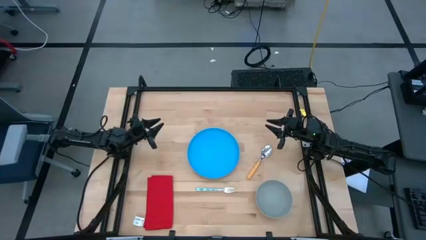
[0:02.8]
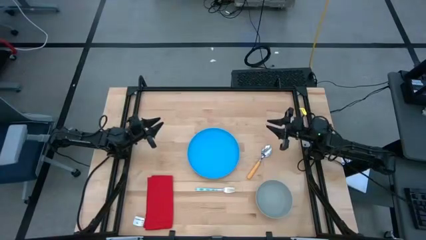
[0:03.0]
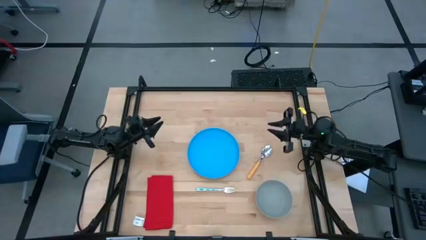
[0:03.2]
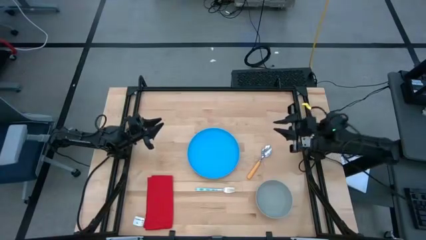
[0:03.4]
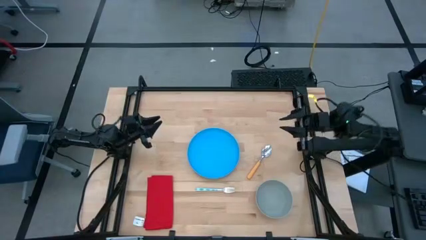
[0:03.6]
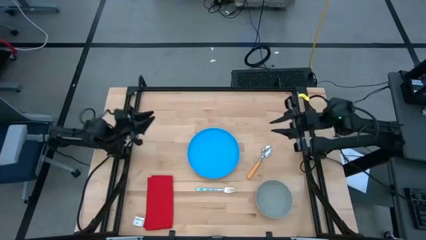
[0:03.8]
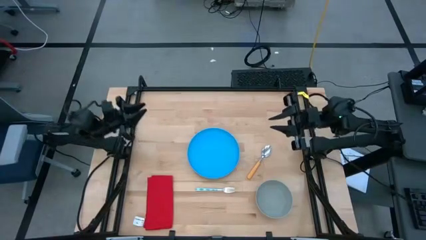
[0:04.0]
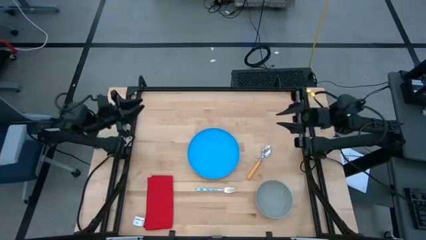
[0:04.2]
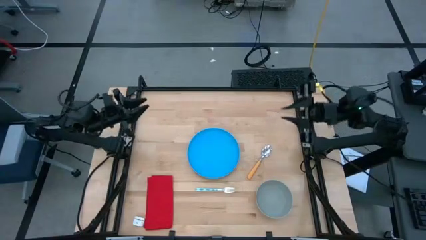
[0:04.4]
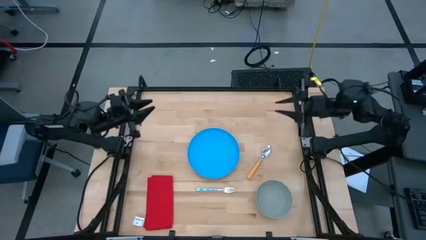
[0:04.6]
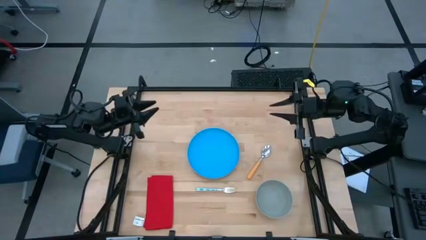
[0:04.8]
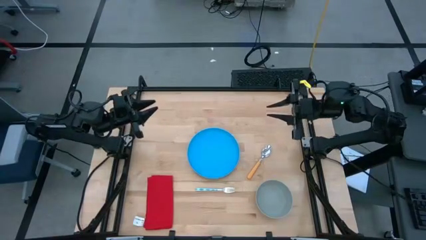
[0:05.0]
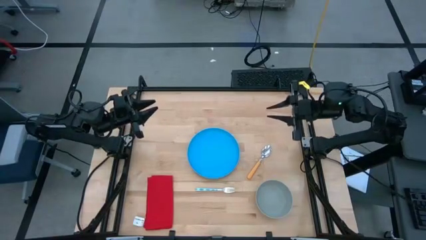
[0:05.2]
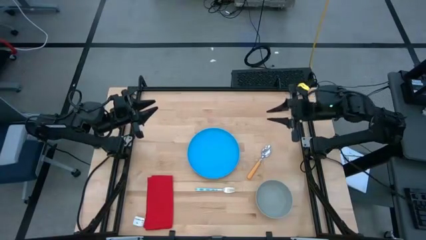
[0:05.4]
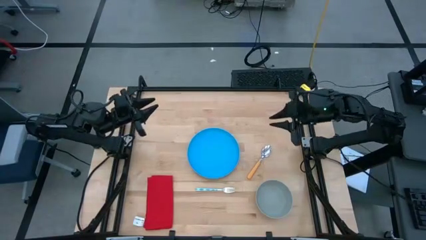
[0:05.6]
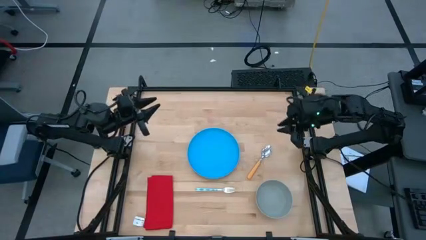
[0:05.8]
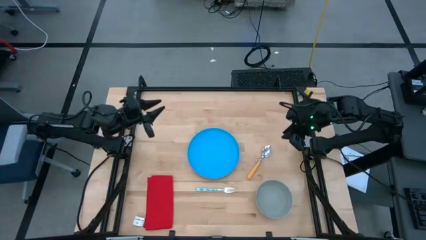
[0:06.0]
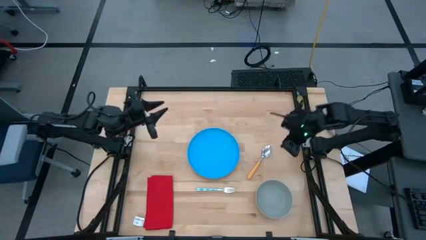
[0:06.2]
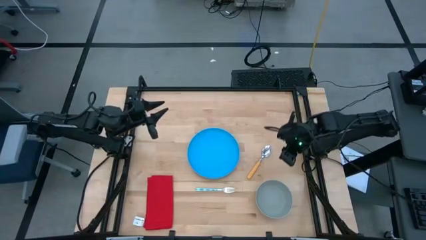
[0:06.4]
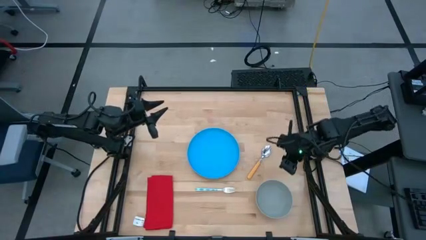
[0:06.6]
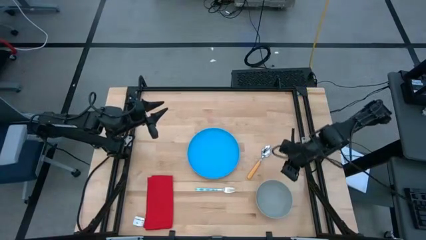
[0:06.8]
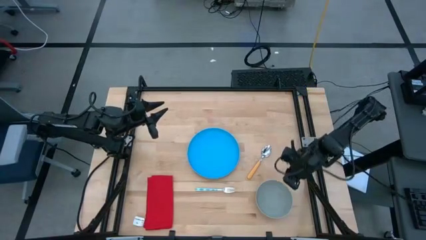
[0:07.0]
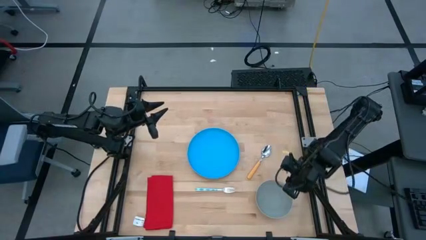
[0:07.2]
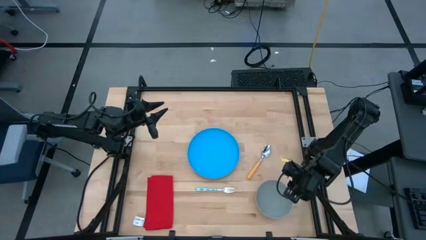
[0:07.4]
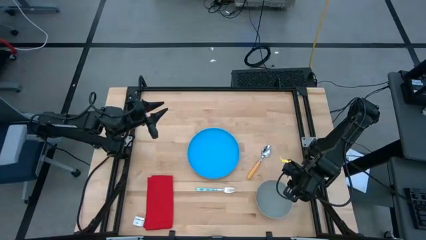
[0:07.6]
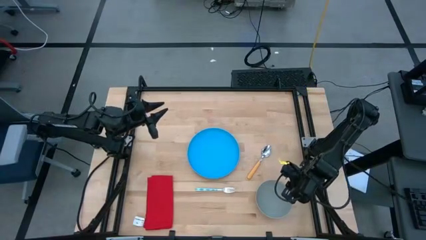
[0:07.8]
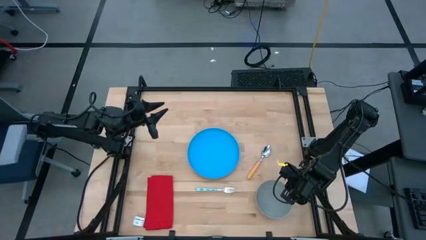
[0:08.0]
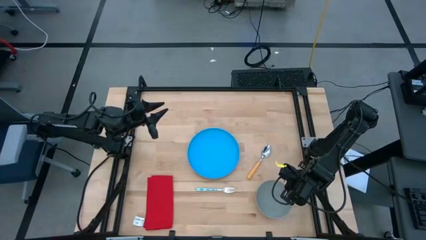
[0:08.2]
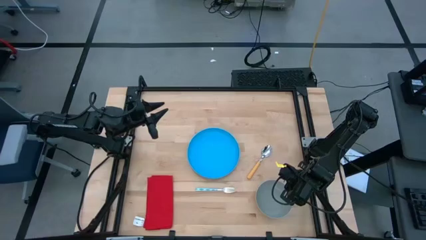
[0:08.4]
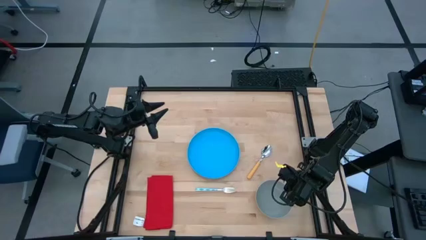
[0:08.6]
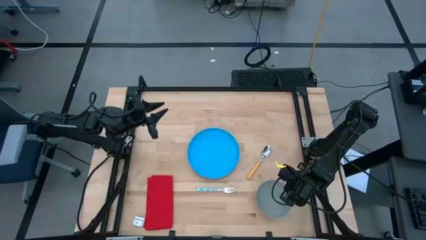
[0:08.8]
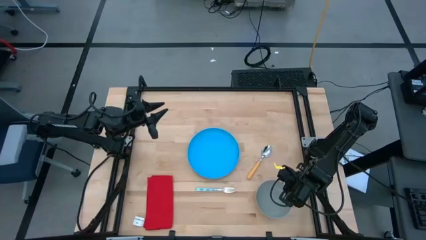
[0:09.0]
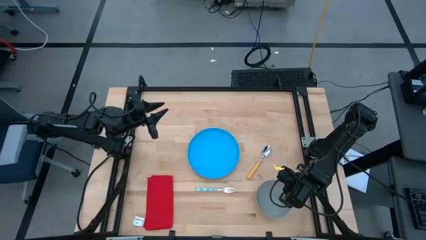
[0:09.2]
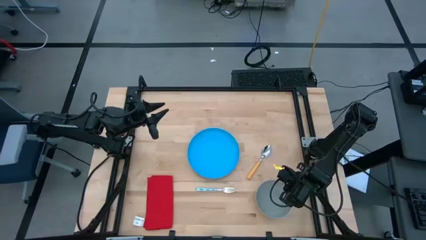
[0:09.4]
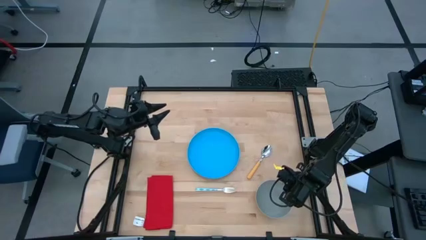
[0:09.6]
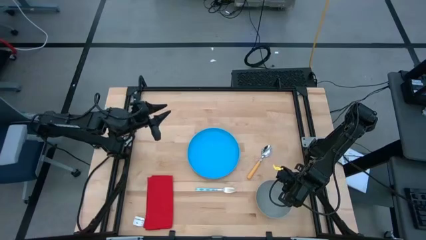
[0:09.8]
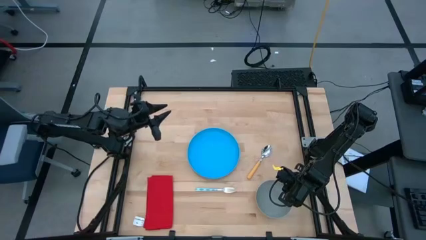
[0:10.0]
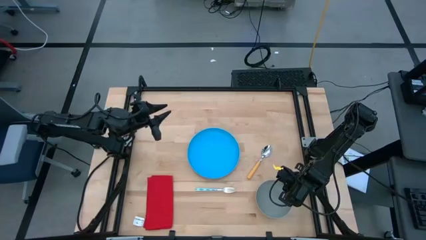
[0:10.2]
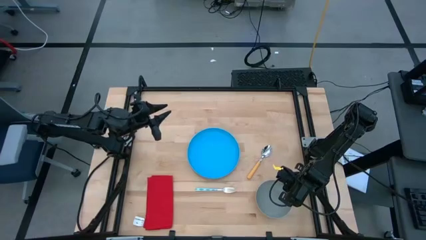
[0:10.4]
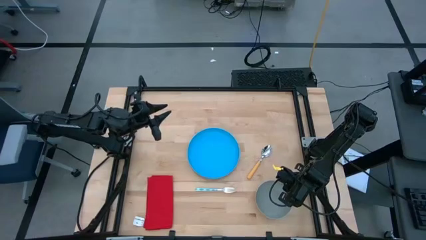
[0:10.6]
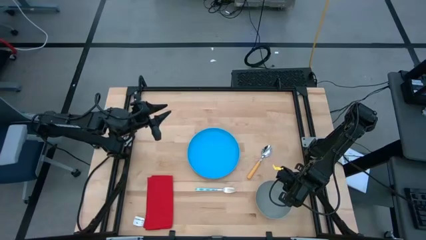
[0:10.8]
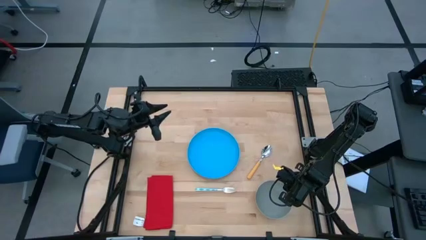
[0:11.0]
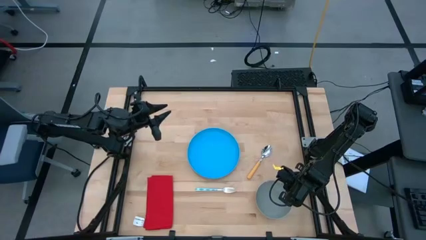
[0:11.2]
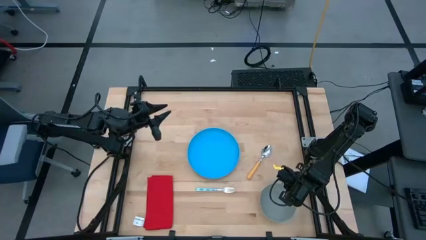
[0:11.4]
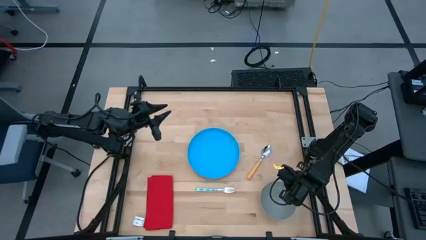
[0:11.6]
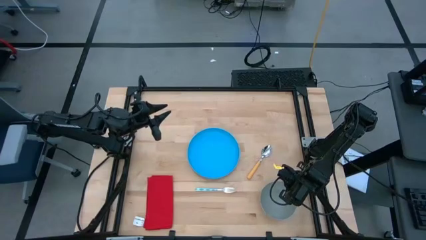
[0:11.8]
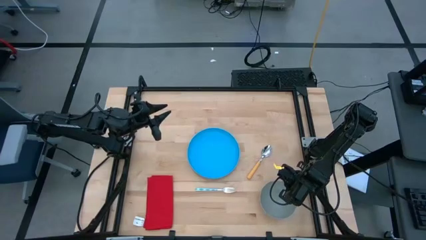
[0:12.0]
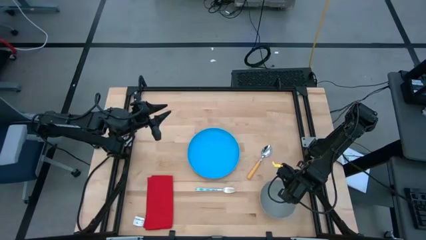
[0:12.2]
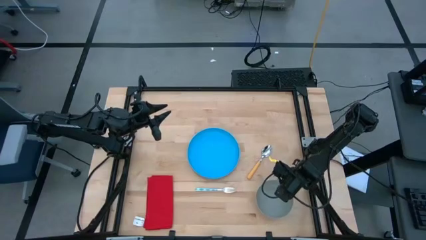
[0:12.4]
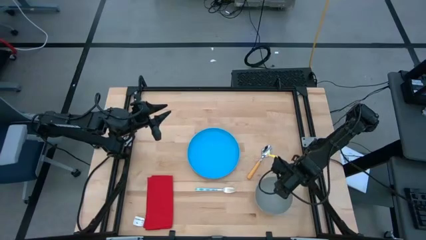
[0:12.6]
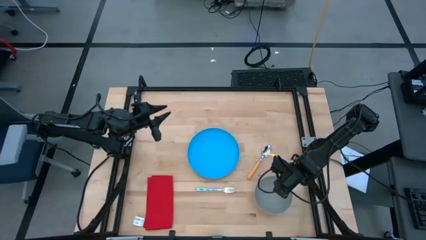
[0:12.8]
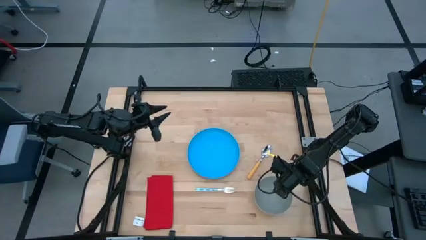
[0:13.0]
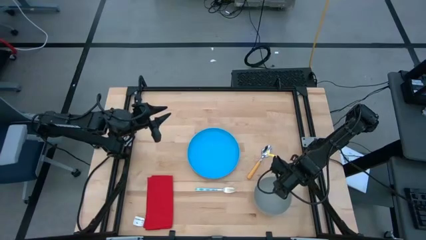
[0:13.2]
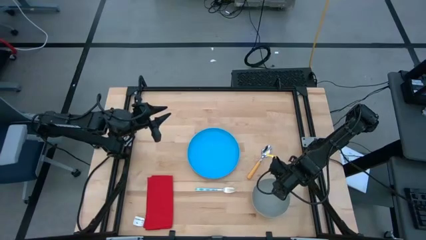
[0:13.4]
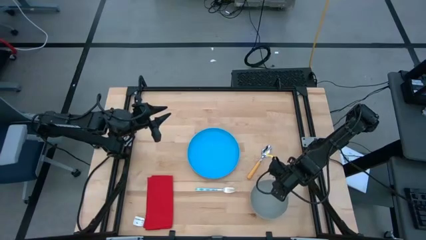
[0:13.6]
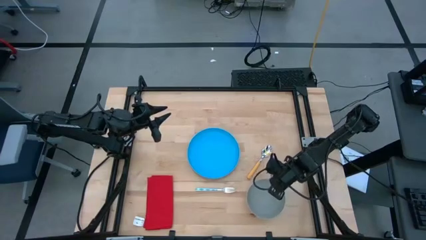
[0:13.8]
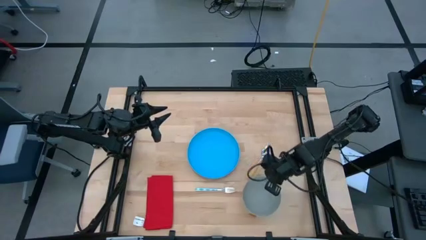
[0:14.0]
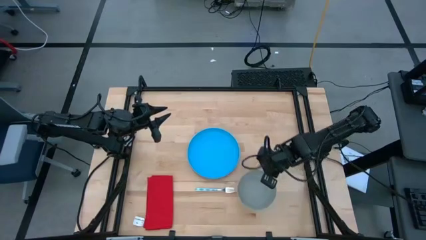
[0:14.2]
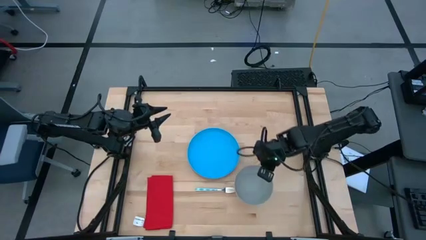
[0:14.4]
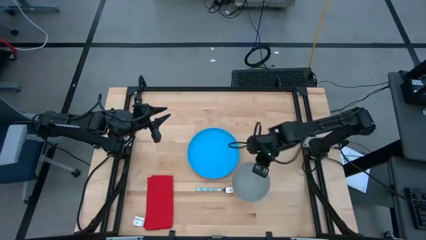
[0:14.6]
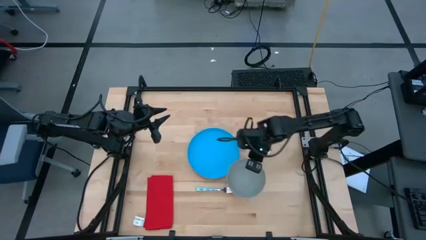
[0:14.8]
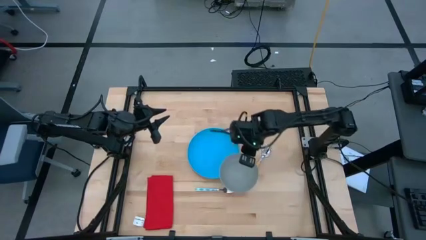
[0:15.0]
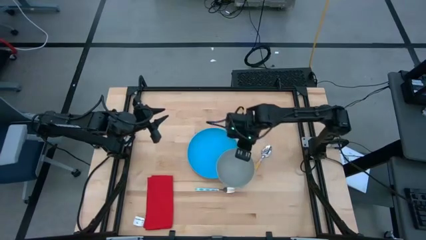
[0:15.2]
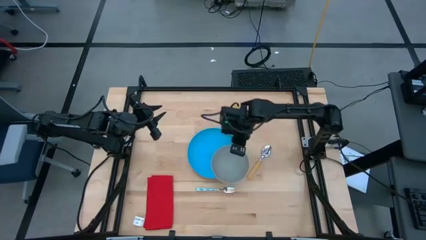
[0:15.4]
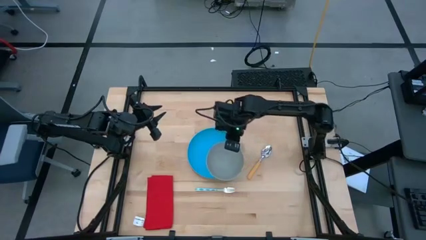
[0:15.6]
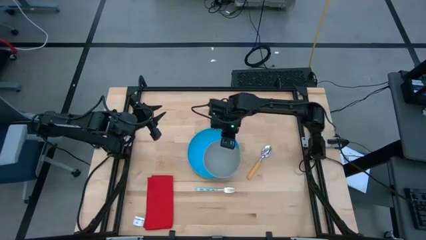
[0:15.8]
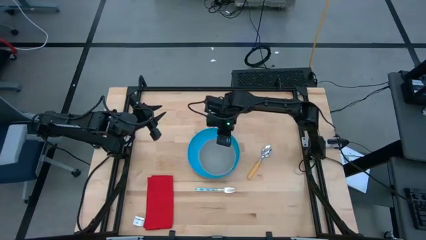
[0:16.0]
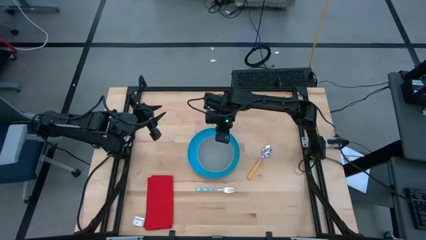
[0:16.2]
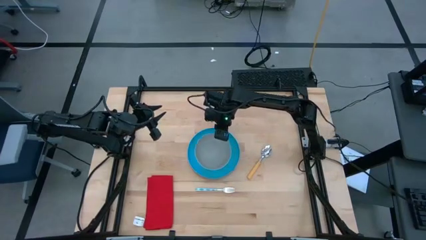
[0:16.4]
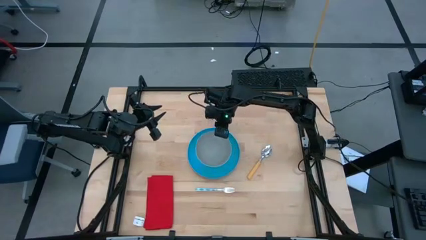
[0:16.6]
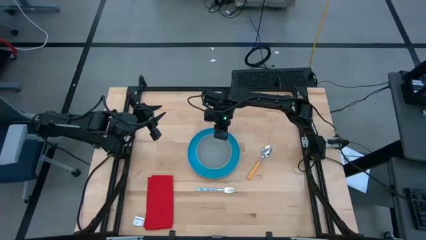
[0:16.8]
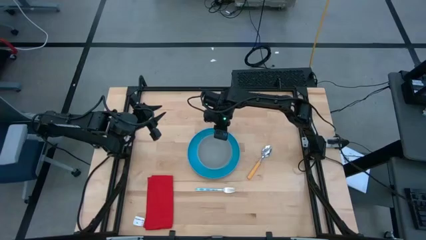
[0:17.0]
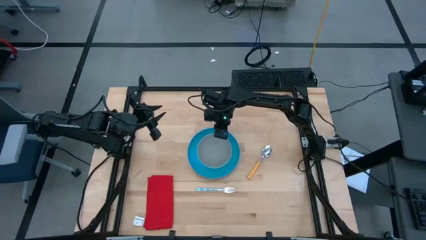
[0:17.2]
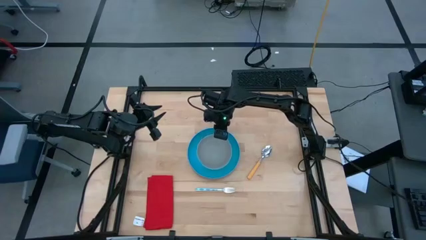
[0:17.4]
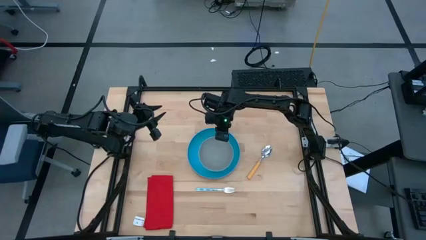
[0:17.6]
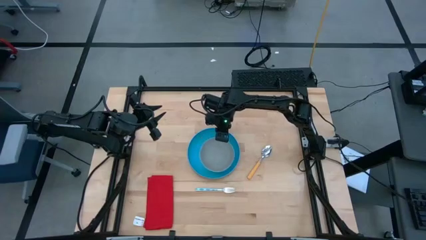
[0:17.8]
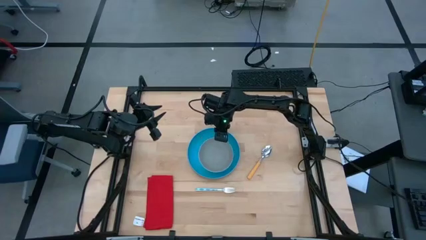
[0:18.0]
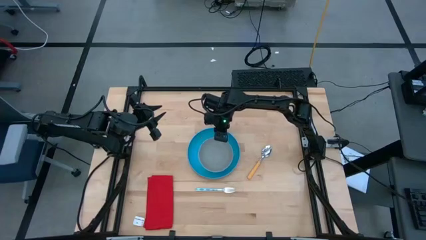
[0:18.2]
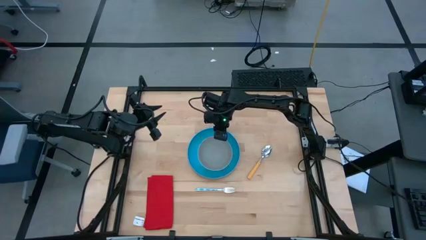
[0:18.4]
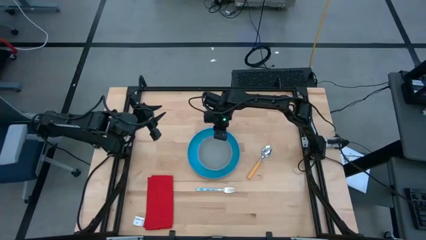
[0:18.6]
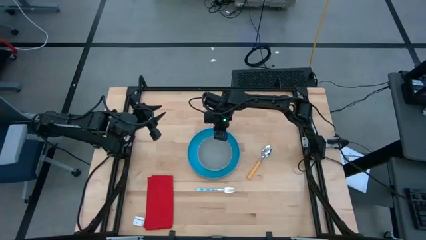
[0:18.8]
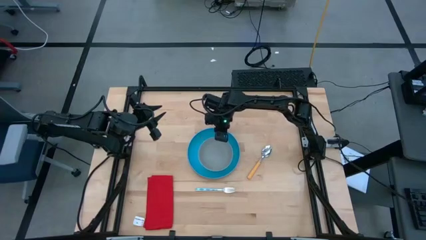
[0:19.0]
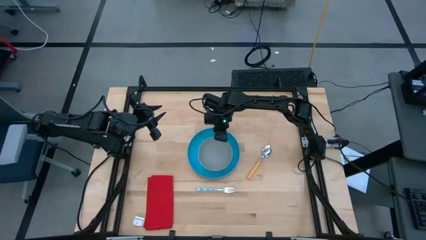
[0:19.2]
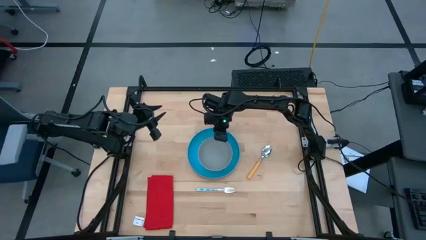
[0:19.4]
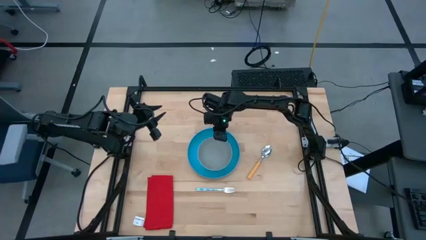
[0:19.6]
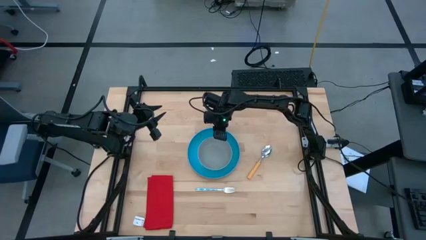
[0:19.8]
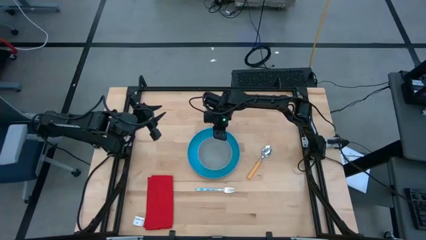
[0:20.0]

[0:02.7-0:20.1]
Task: Set table place
Put the grey bowl on the blue plate
